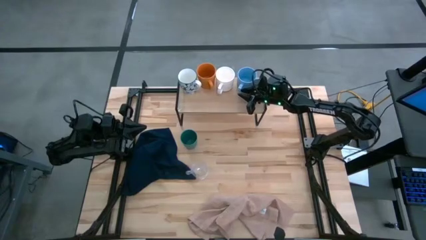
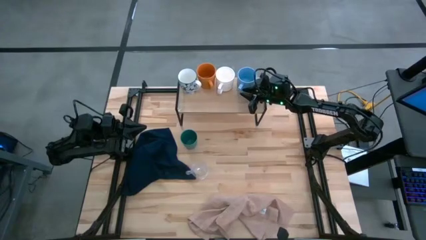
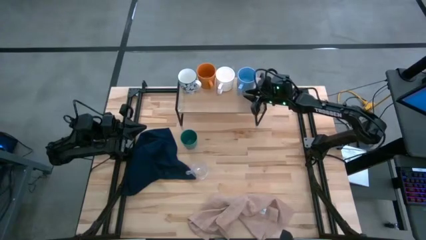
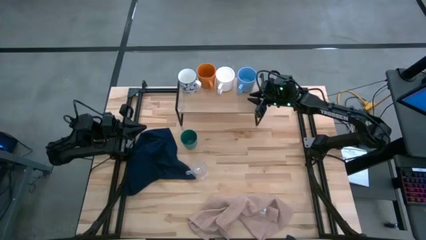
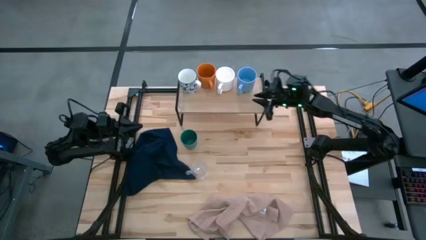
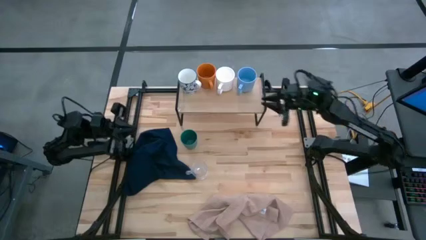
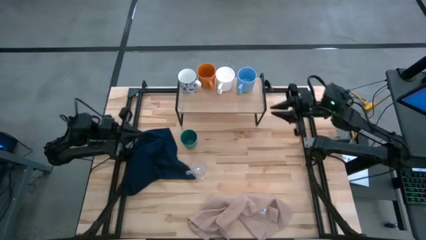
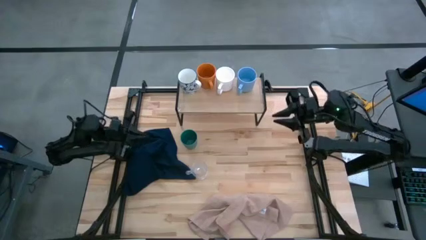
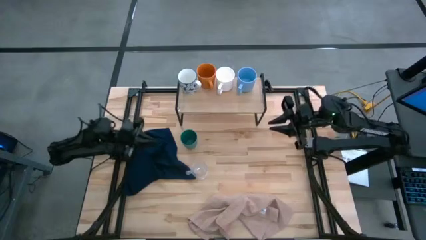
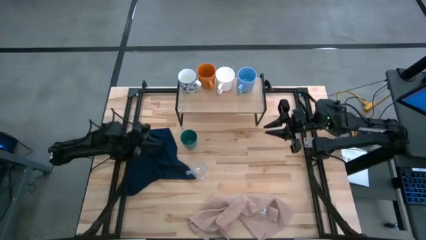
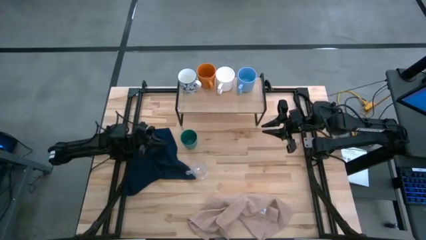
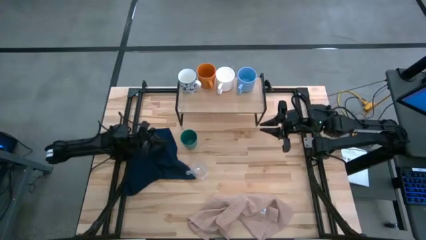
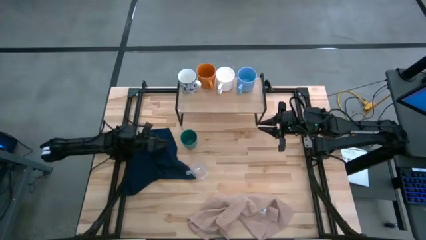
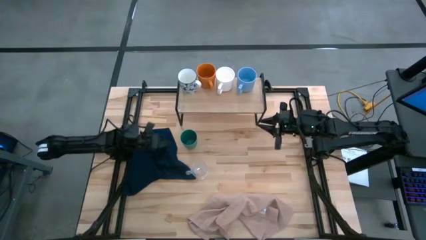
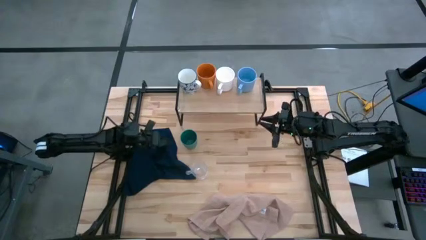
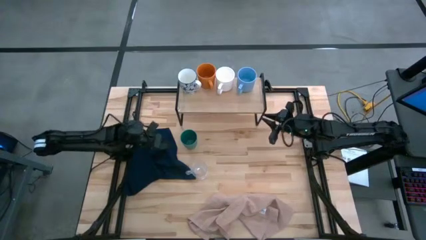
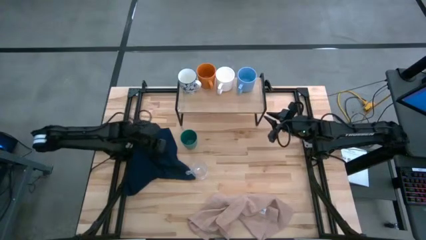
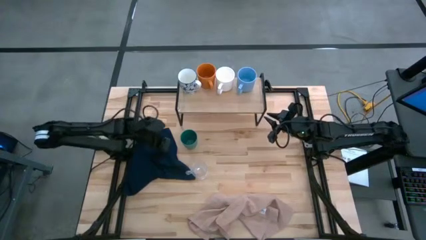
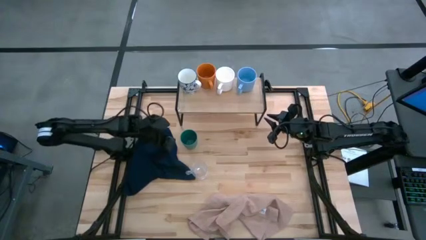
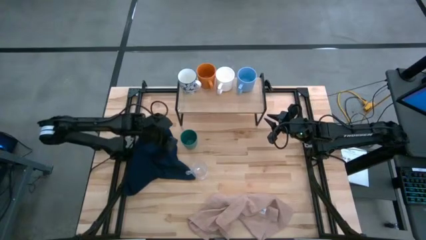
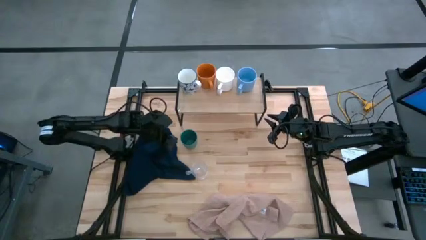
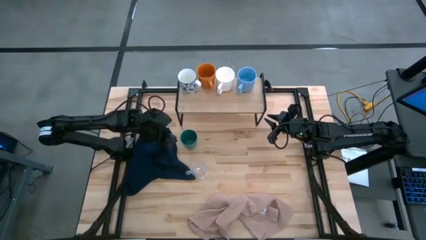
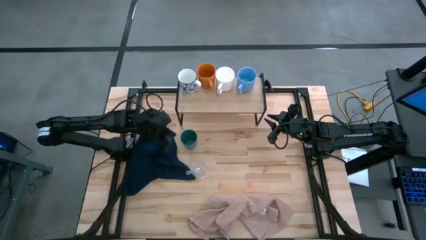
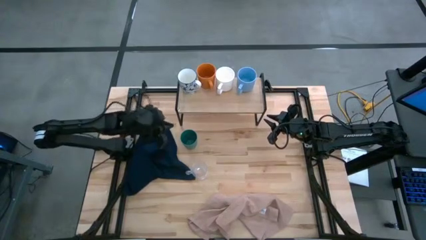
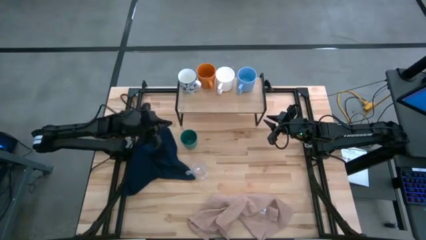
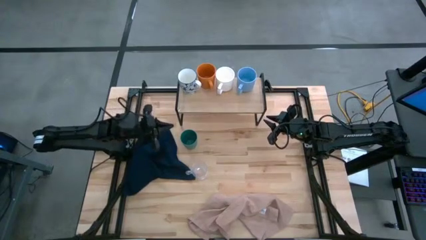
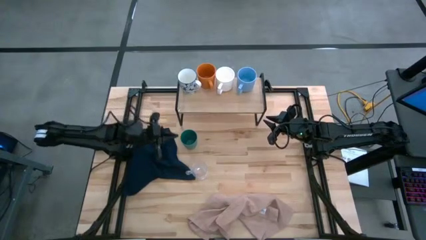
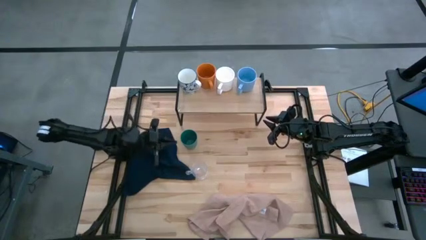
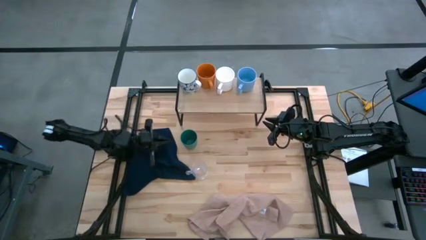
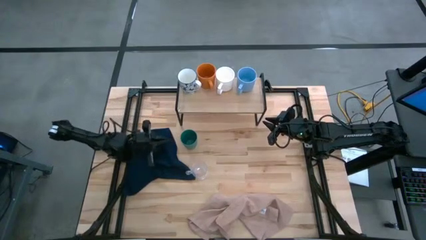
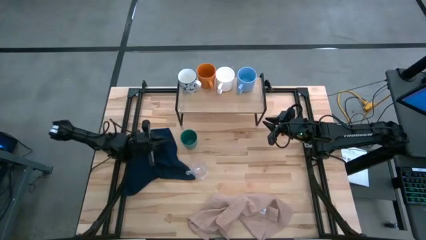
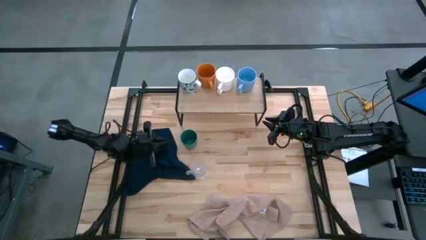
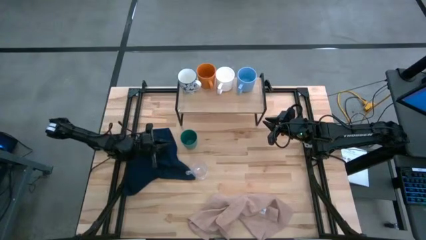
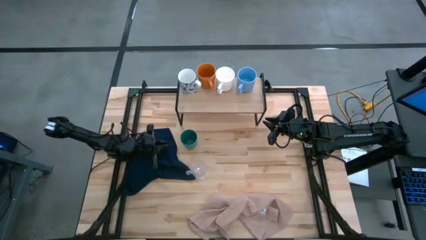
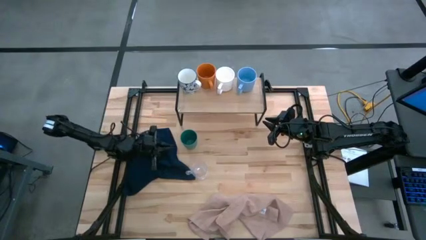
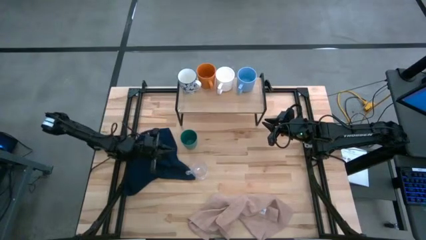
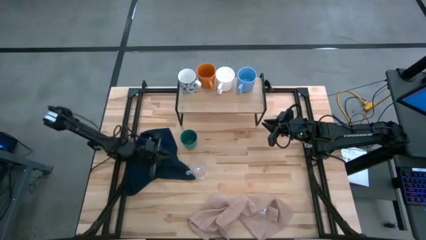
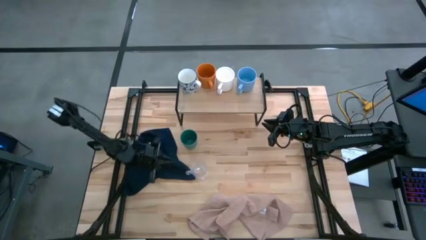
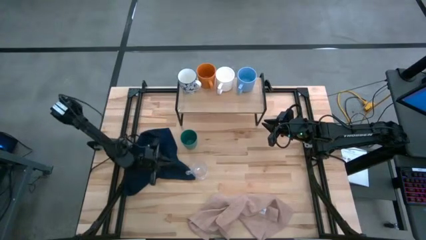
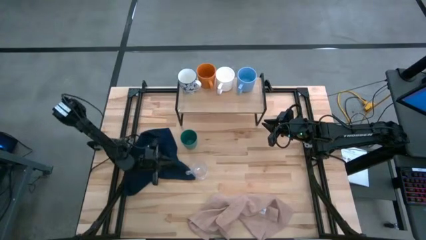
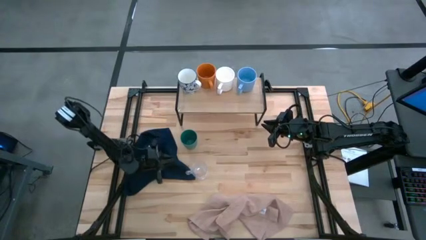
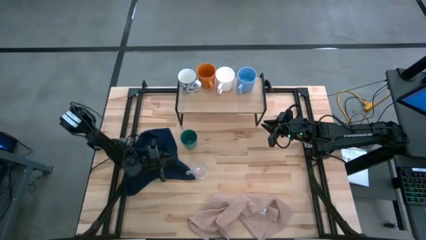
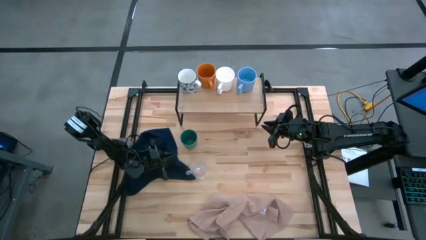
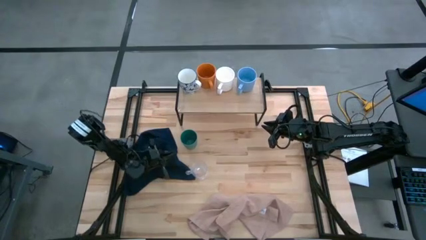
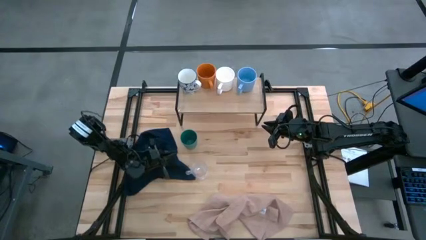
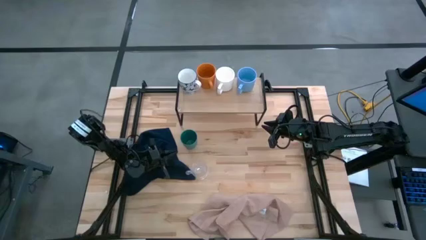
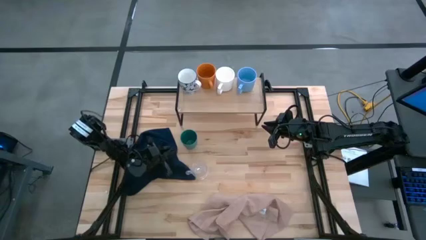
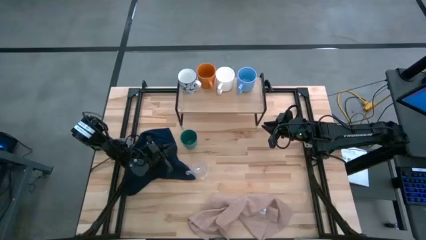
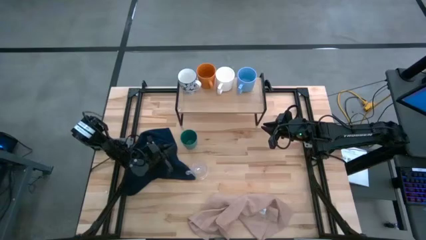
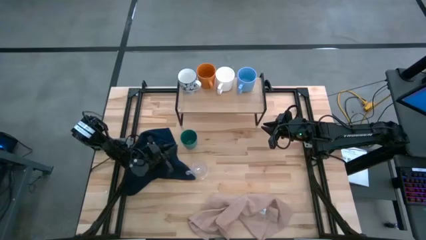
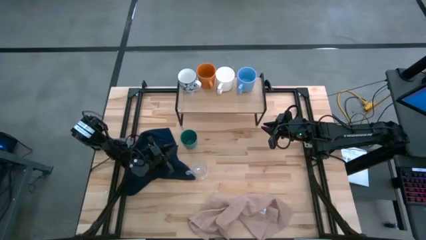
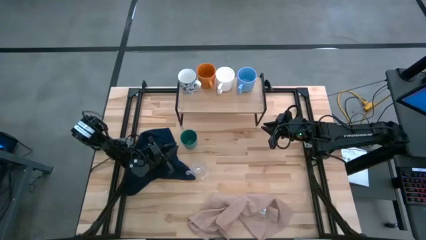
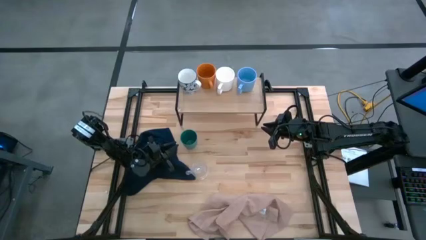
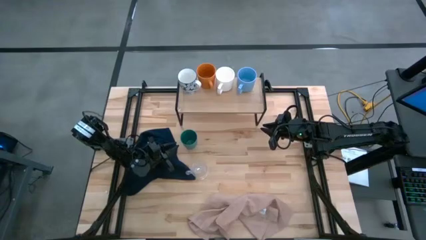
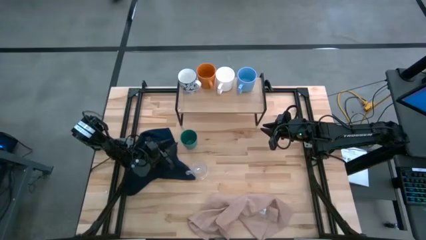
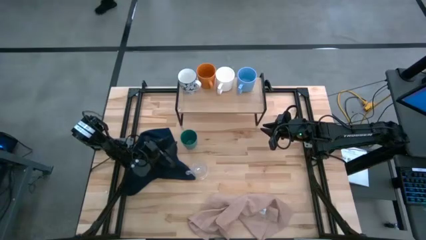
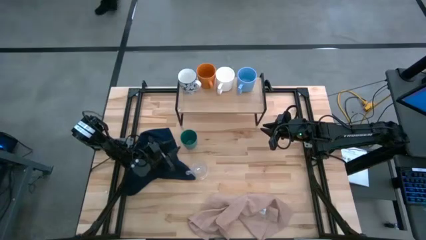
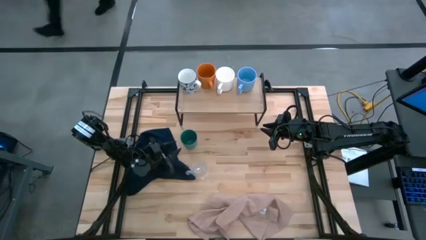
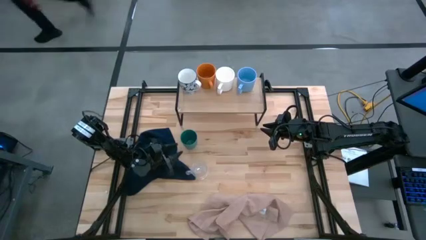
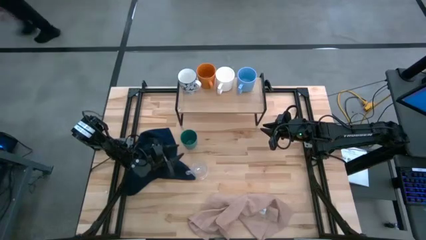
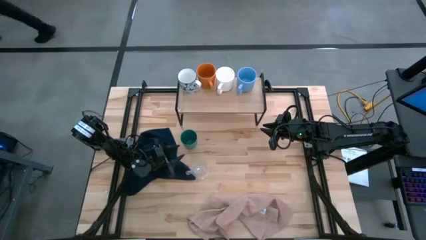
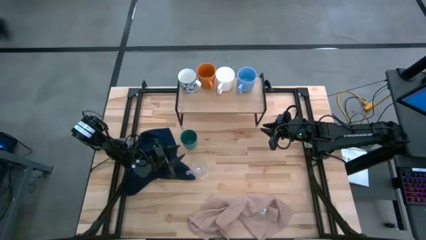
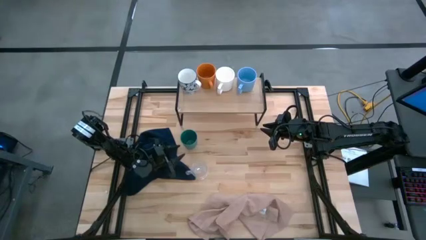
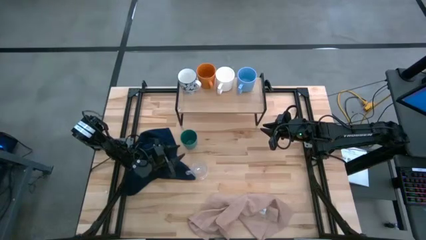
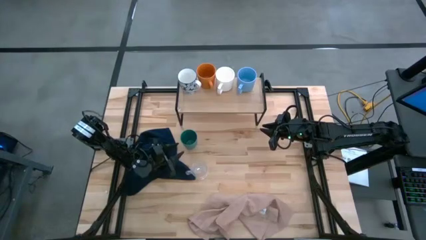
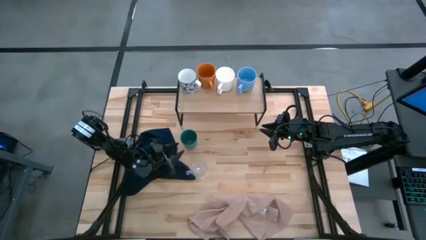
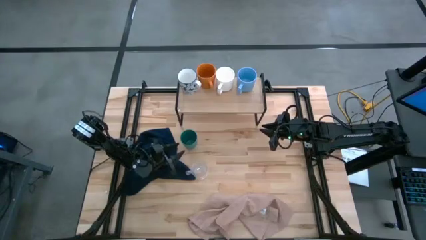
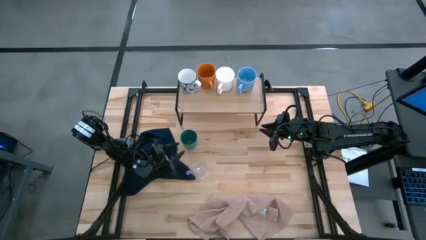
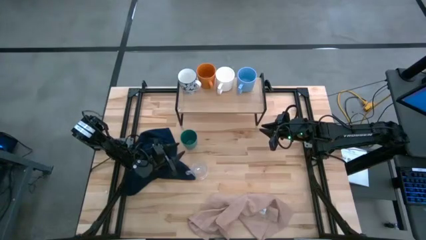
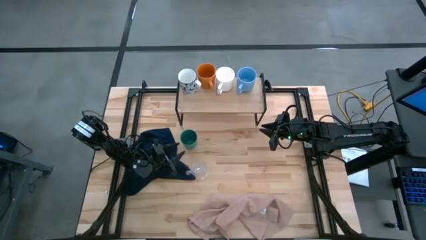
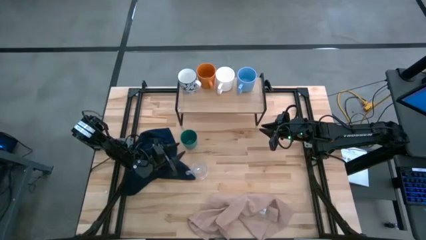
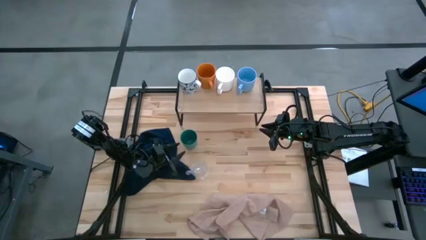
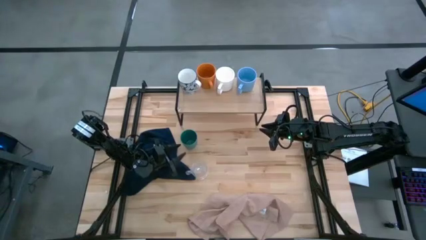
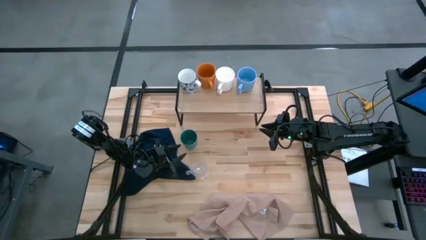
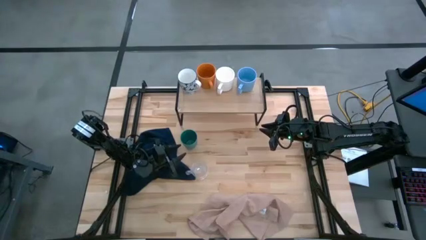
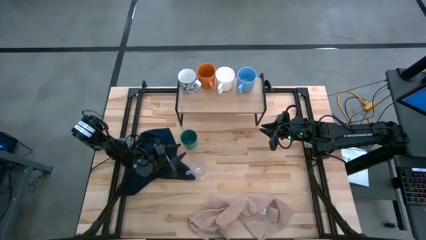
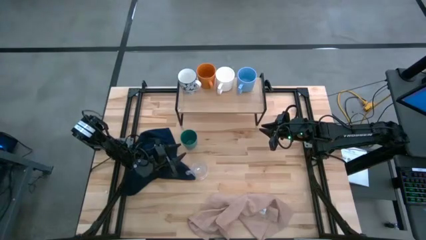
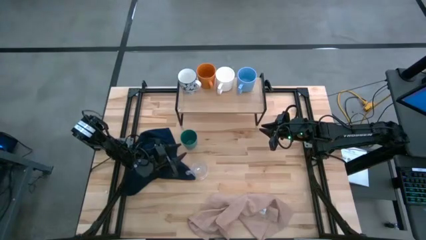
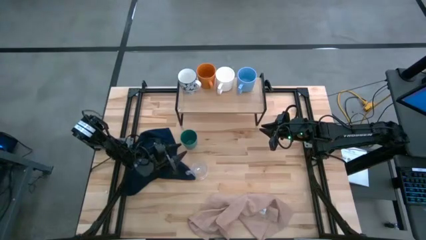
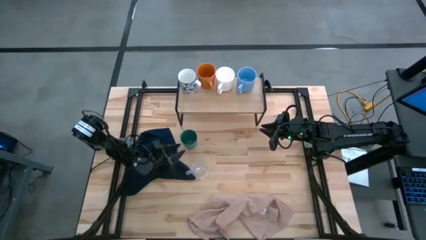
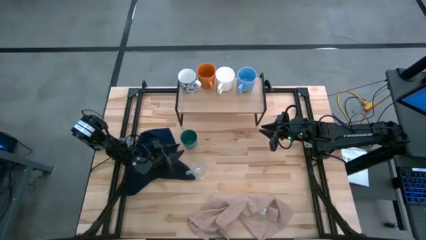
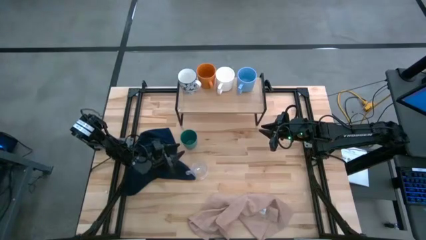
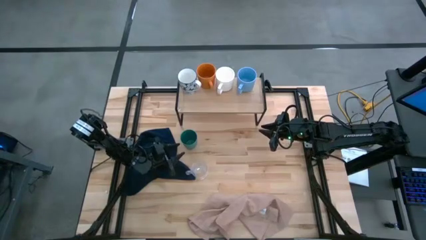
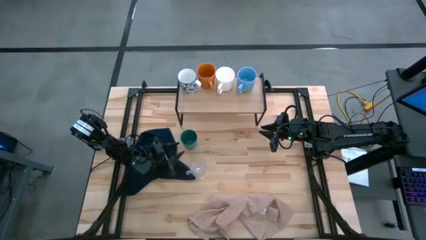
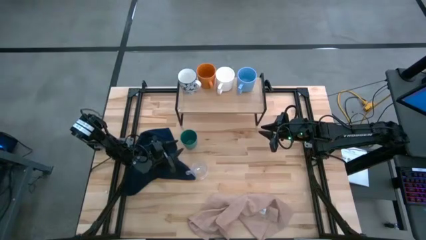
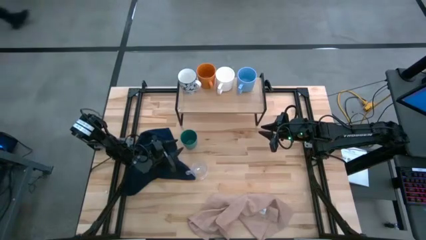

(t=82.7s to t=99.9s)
Task: Stack small to large cups/mugs on shelf
Put the green cup on the shelf
